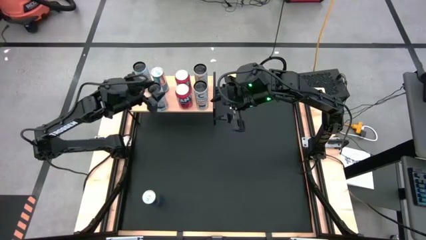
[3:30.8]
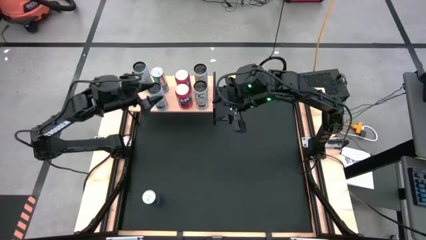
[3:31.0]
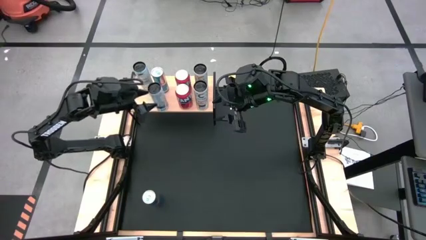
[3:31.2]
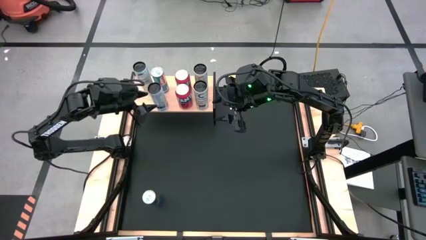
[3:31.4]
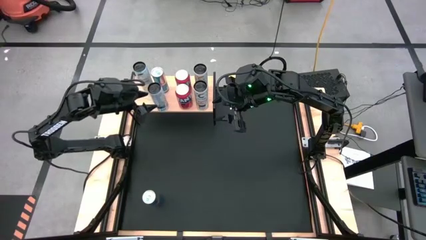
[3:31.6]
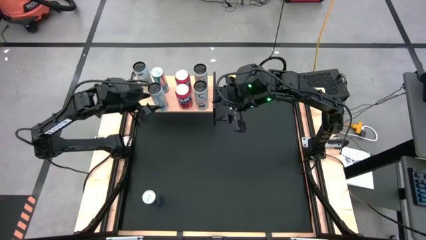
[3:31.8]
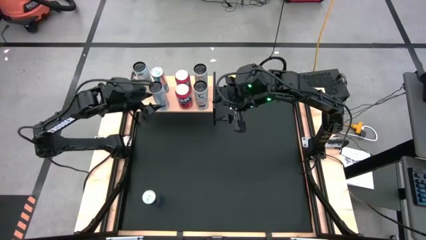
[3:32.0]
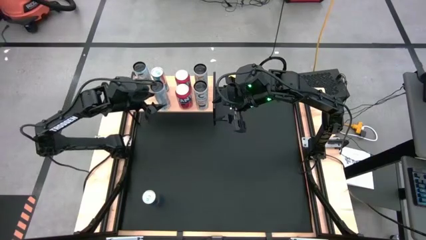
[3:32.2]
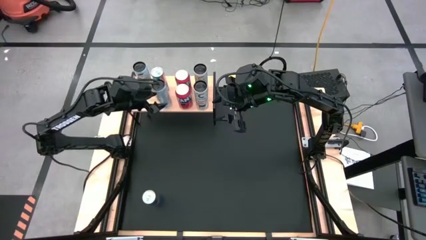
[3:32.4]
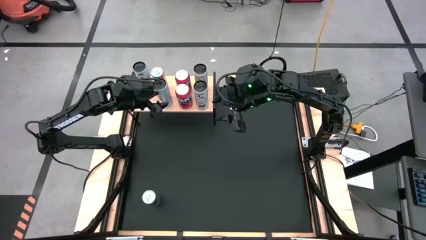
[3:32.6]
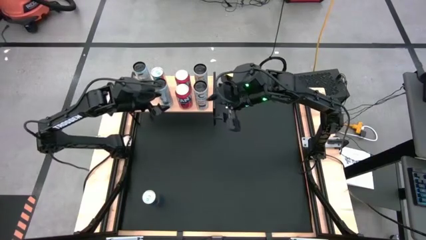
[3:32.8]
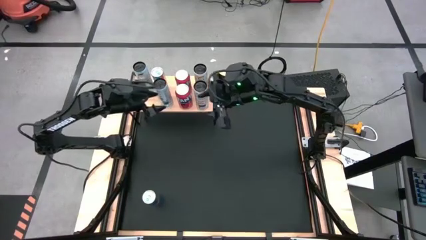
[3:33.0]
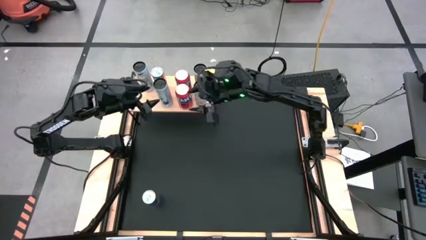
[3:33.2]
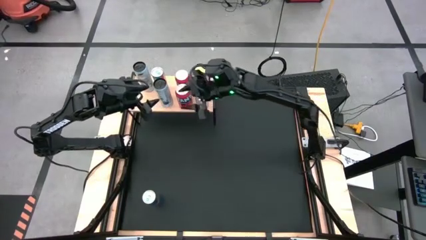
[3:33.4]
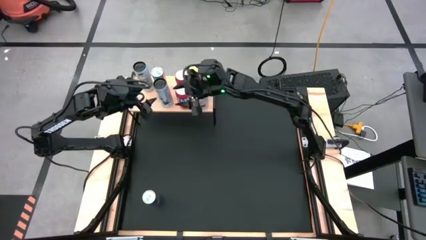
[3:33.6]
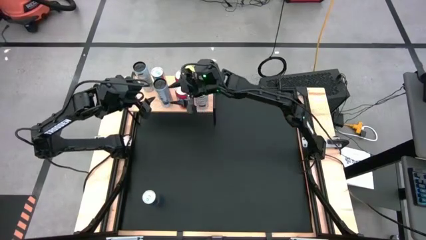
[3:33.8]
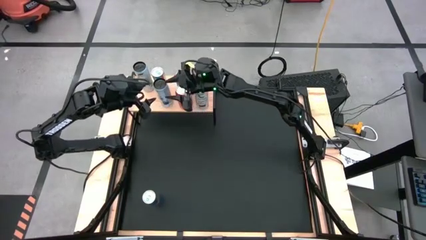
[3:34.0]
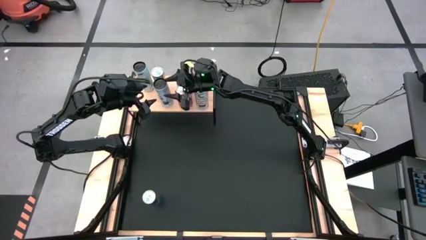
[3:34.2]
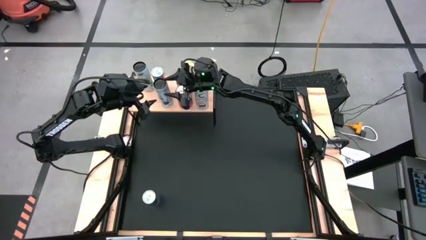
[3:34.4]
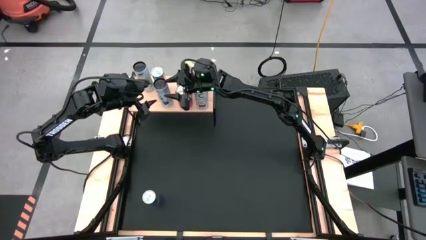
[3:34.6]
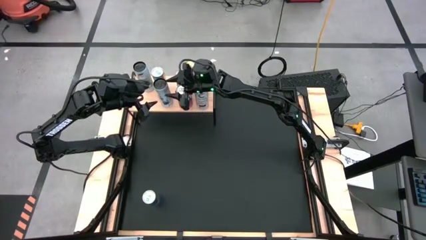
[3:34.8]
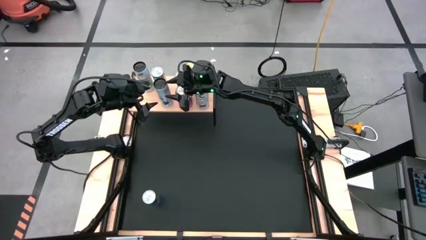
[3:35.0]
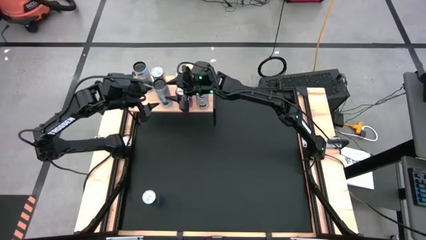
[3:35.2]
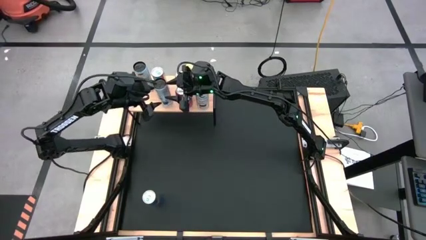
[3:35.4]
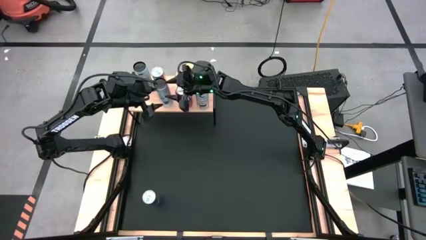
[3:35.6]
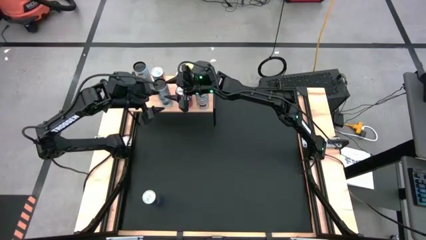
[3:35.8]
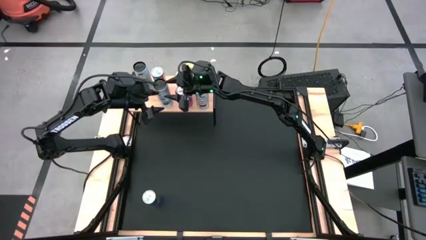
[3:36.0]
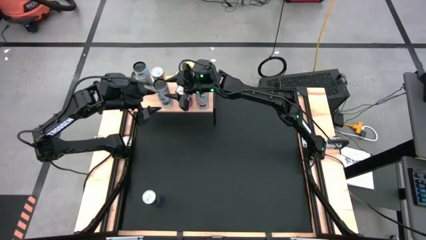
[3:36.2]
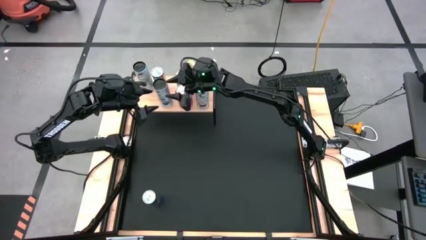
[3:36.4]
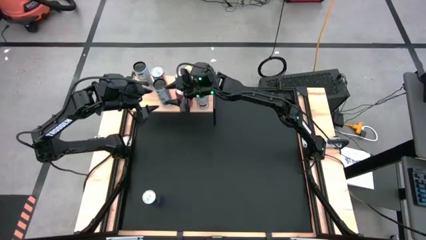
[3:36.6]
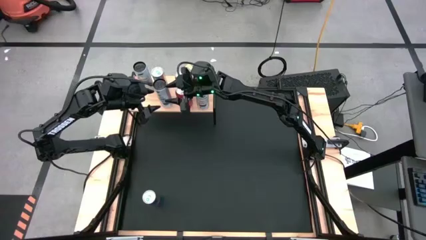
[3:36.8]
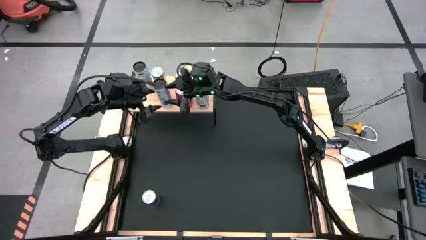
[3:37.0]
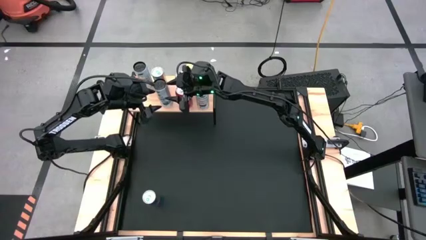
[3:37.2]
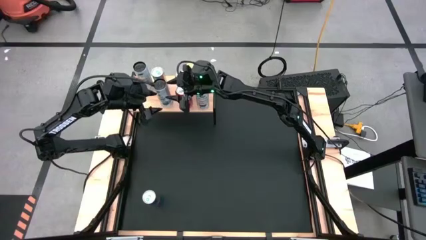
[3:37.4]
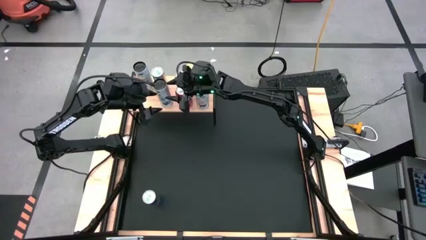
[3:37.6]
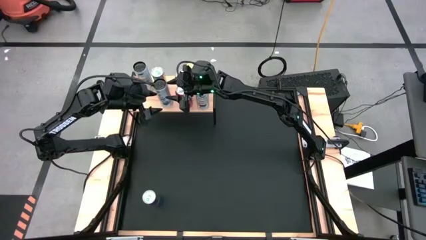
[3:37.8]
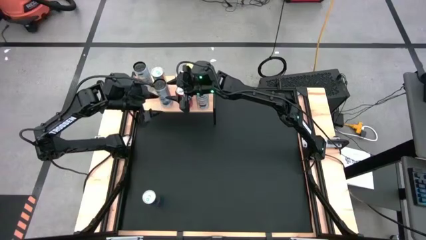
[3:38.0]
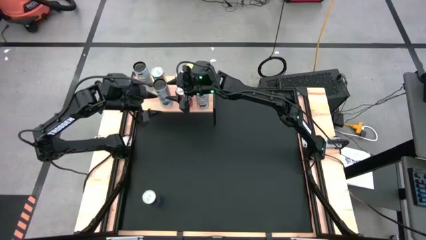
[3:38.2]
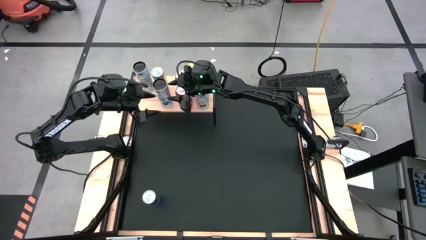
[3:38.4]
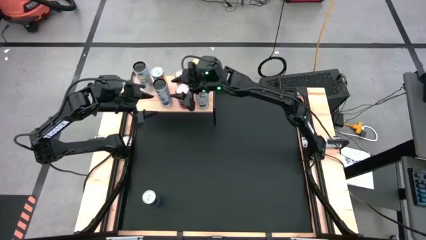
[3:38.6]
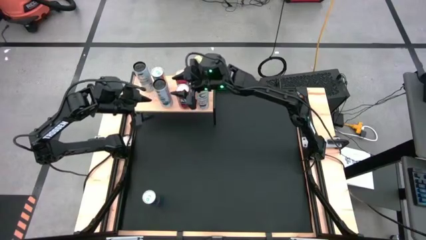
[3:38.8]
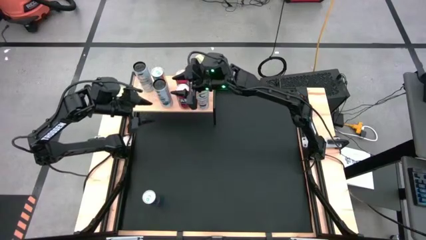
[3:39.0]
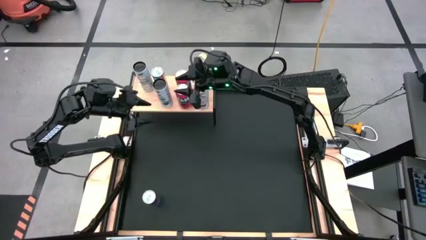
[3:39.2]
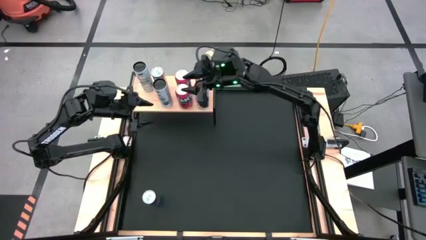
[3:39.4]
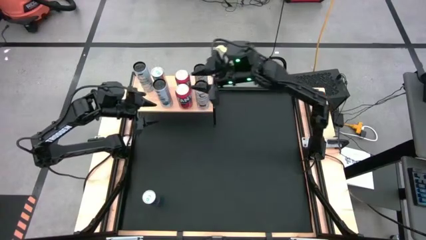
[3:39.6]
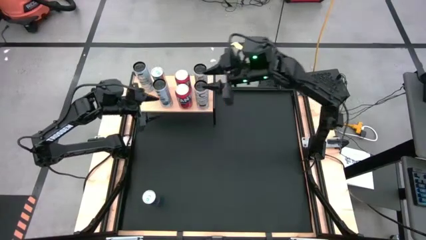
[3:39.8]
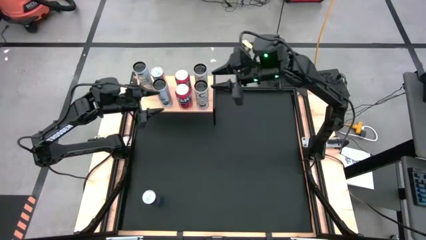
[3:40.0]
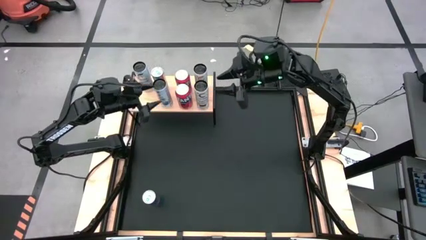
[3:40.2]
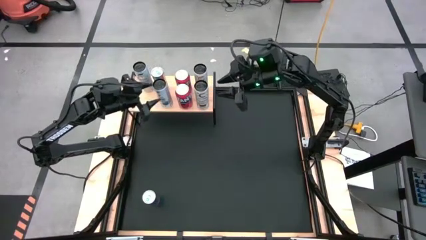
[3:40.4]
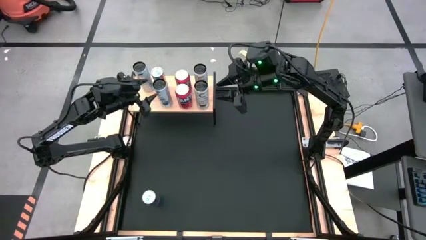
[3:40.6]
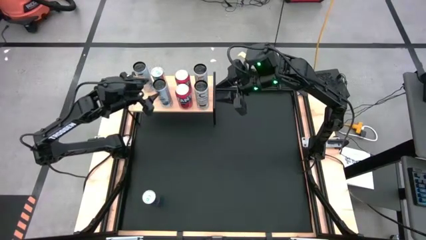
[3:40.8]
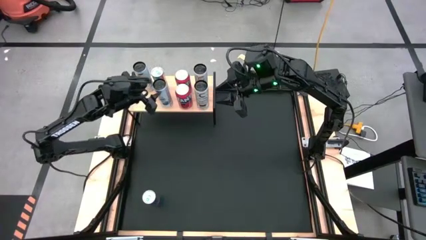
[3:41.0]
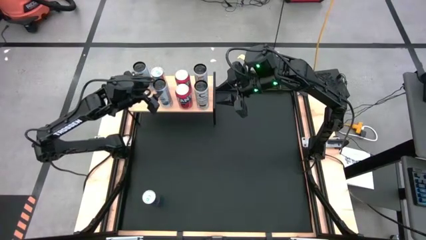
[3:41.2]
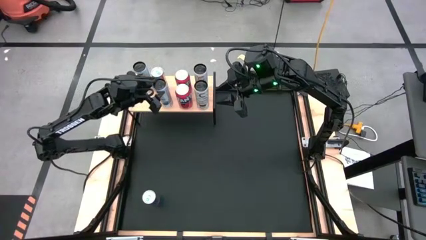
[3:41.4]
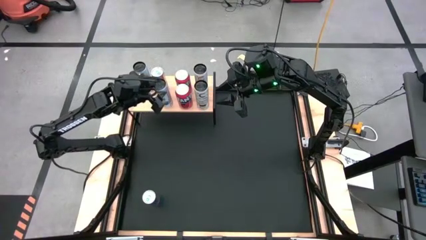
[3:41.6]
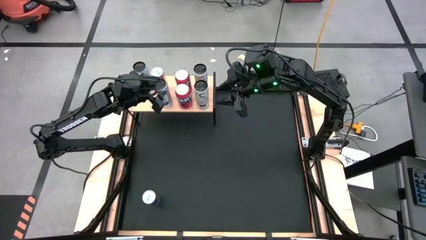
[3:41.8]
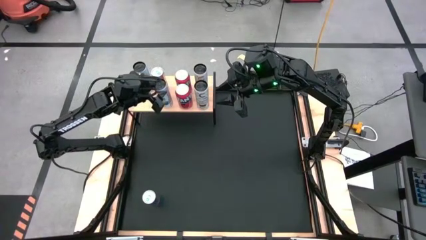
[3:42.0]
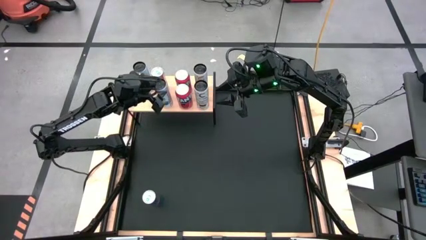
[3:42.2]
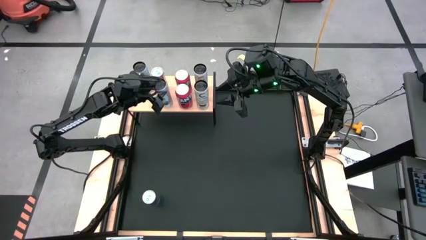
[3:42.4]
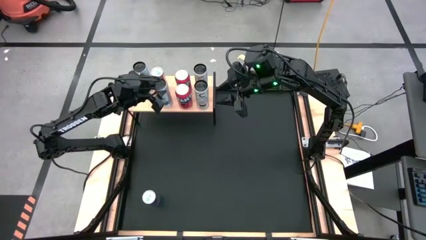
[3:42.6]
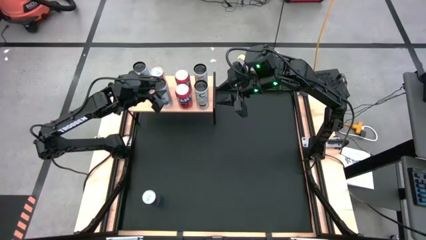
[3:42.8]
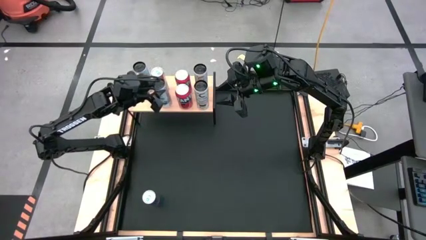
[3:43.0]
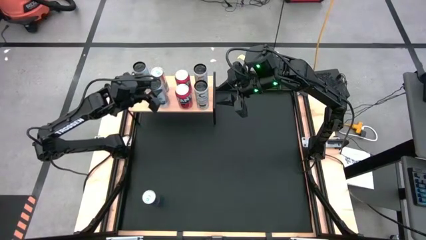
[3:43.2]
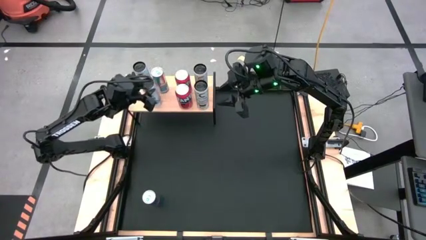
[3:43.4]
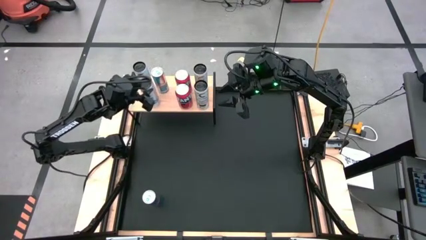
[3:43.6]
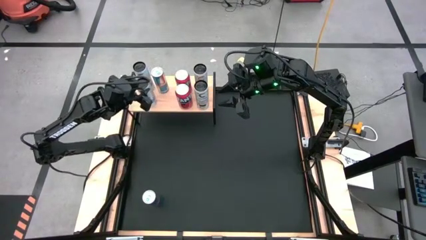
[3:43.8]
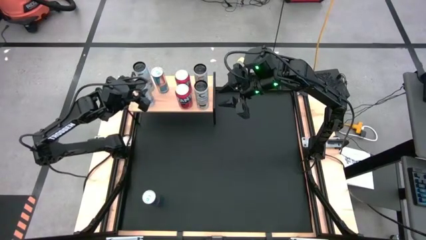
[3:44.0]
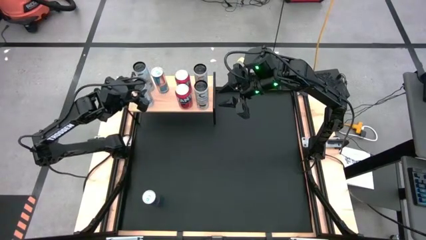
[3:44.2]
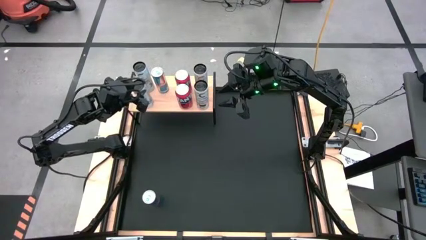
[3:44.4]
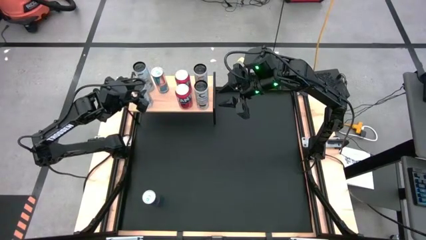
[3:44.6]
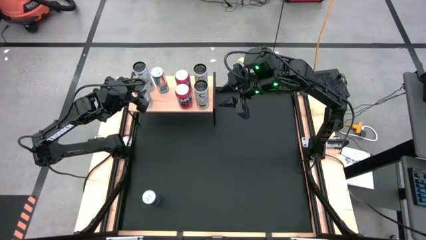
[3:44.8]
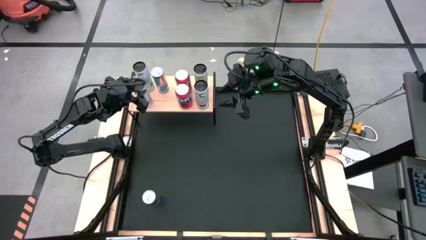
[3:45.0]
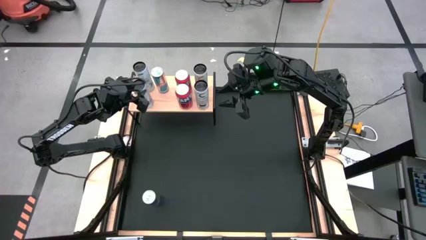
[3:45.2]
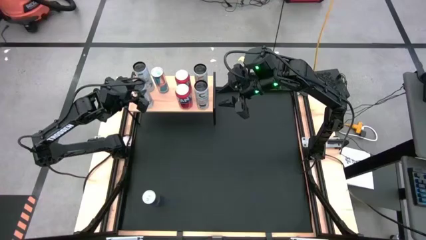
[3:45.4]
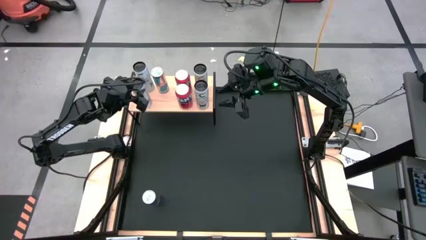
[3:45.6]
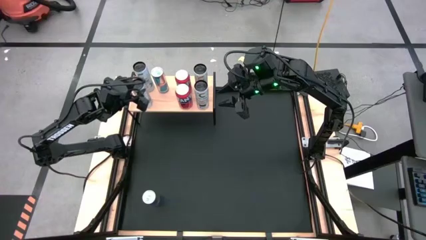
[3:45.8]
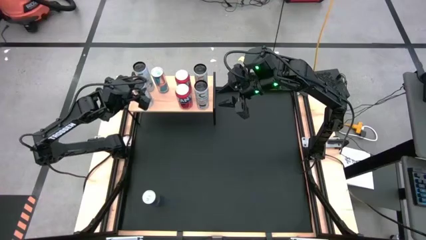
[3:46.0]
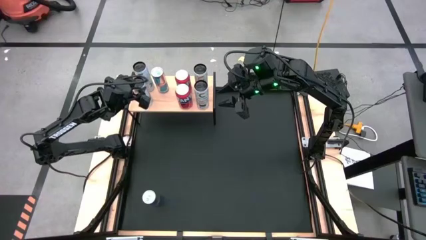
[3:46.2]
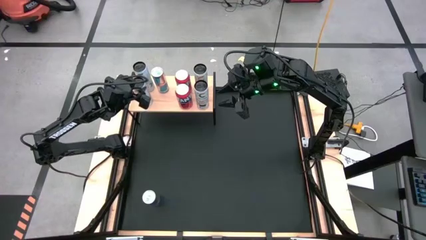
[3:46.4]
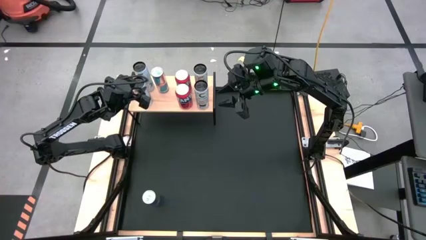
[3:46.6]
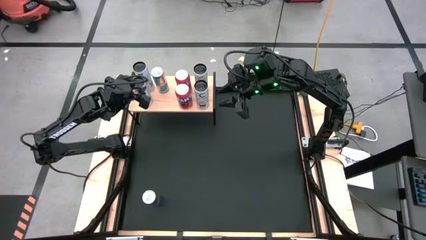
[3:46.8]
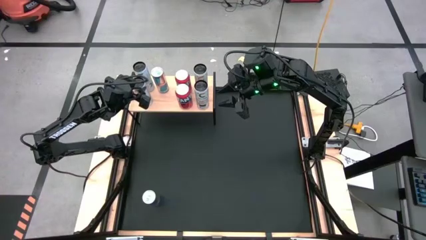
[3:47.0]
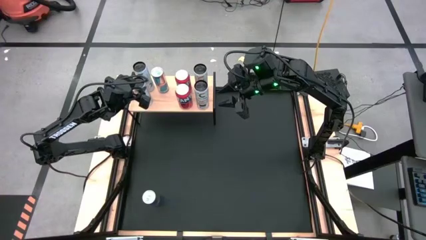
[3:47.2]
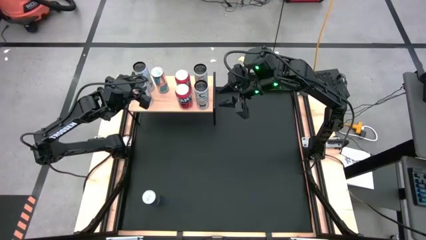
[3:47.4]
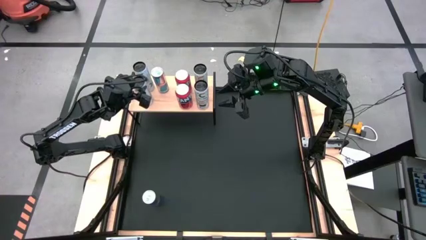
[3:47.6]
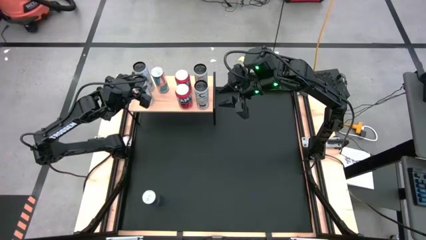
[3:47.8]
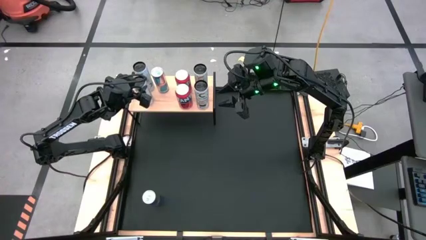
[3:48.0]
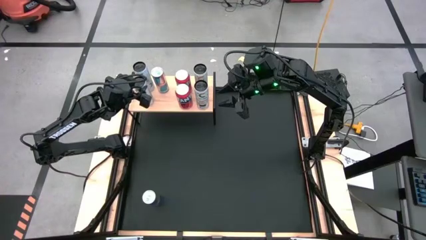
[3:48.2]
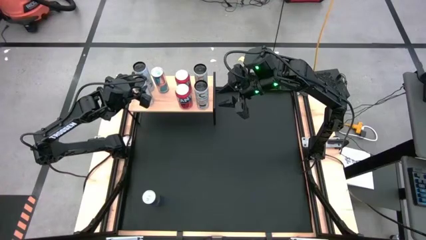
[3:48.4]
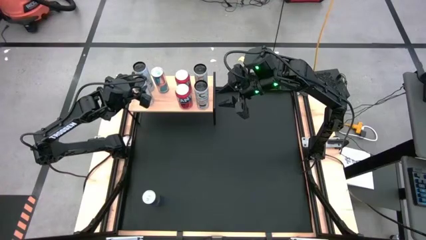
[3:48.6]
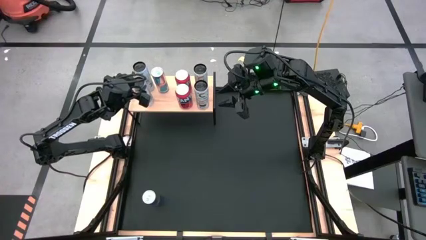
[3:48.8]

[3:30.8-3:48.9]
Task: Place canned beverage on shelf
Put the white-blue soda can aligned with the other white-blue soda can on the shelf
